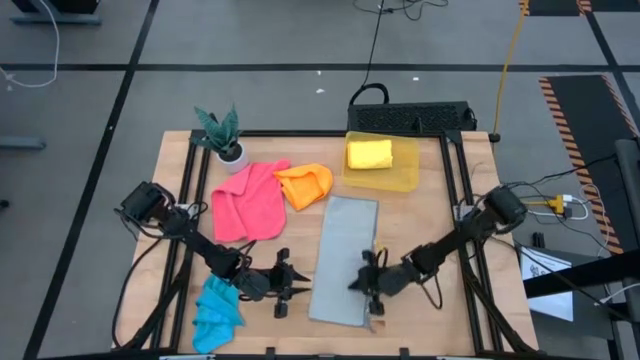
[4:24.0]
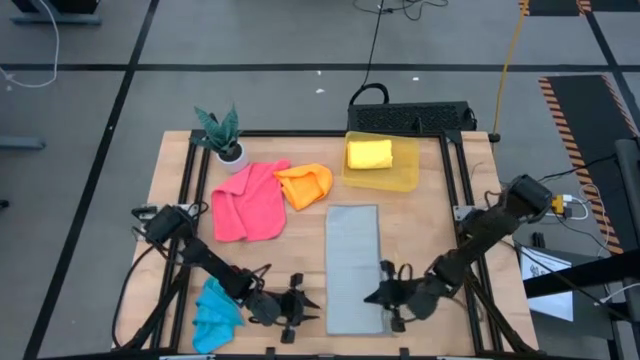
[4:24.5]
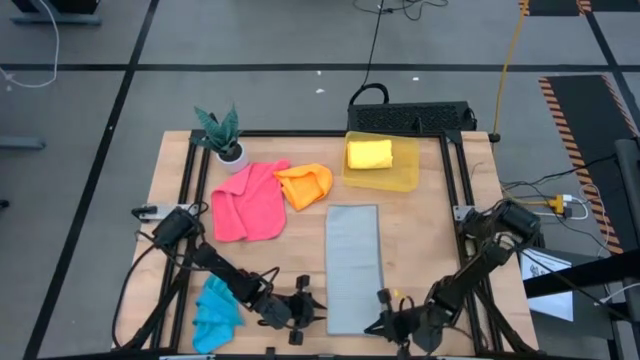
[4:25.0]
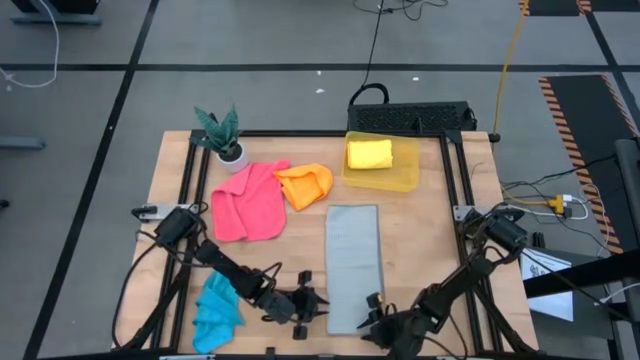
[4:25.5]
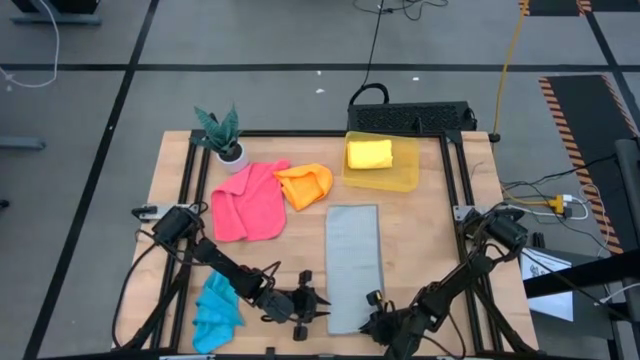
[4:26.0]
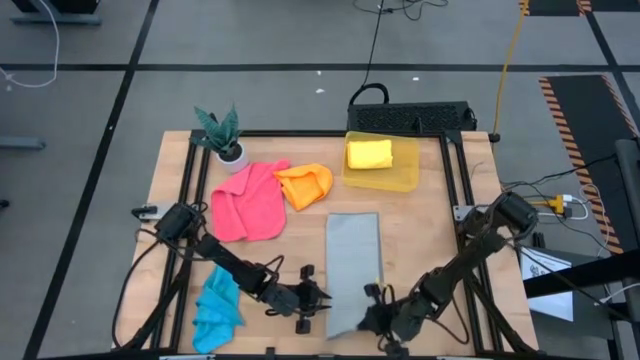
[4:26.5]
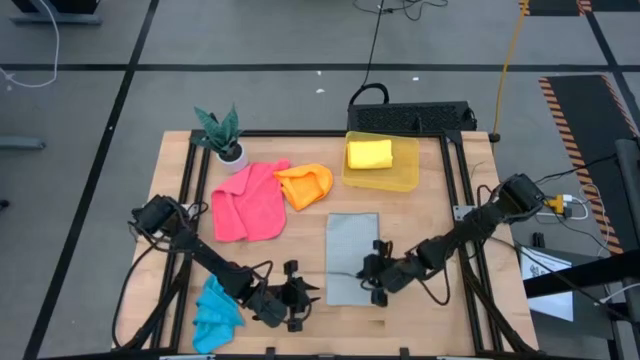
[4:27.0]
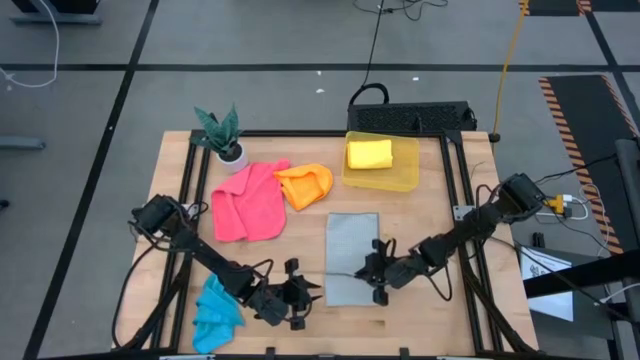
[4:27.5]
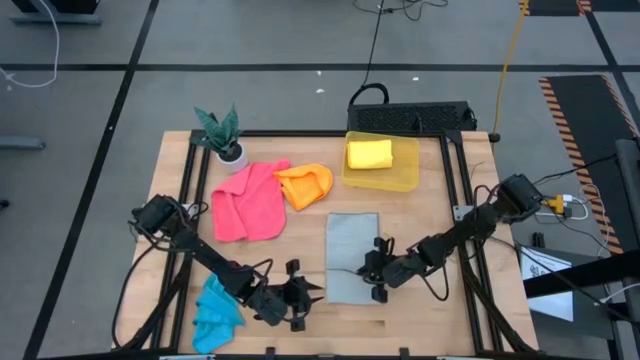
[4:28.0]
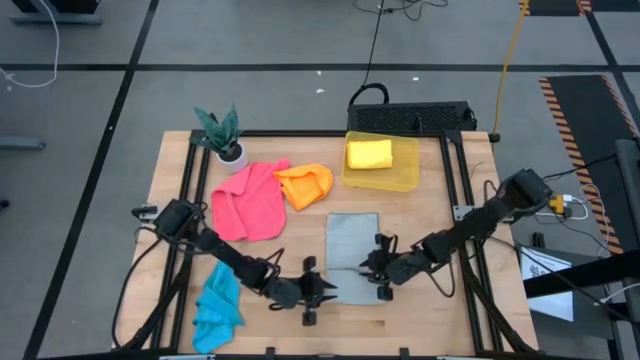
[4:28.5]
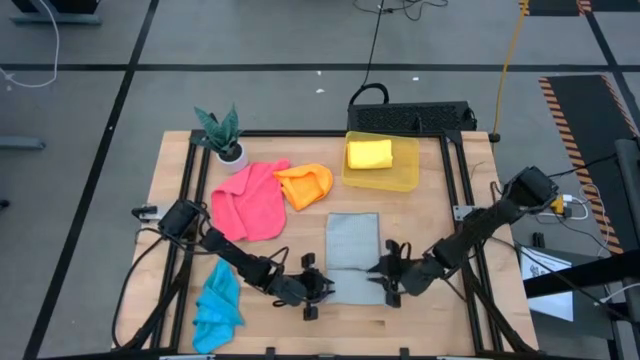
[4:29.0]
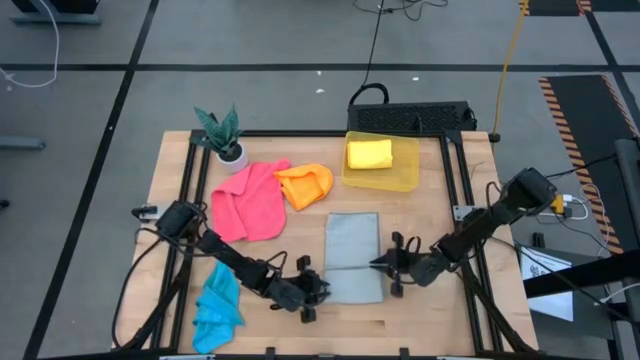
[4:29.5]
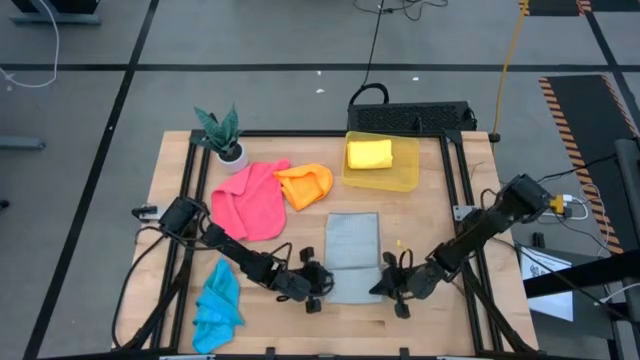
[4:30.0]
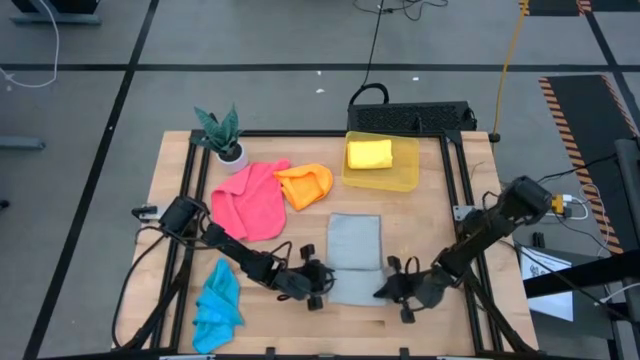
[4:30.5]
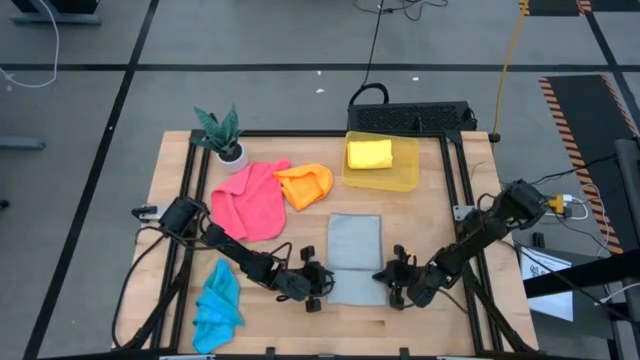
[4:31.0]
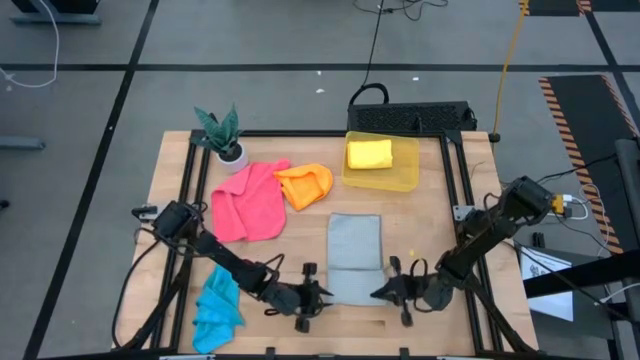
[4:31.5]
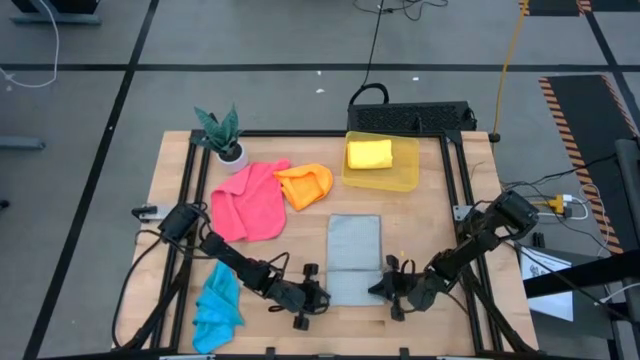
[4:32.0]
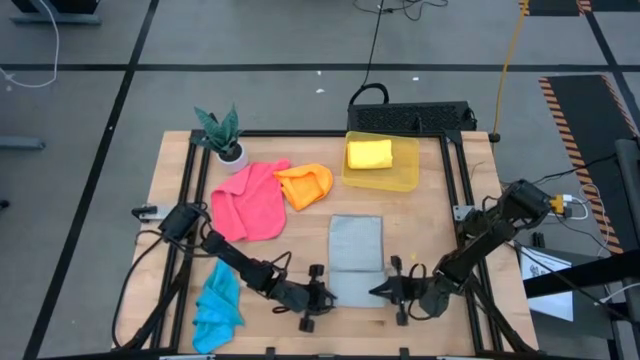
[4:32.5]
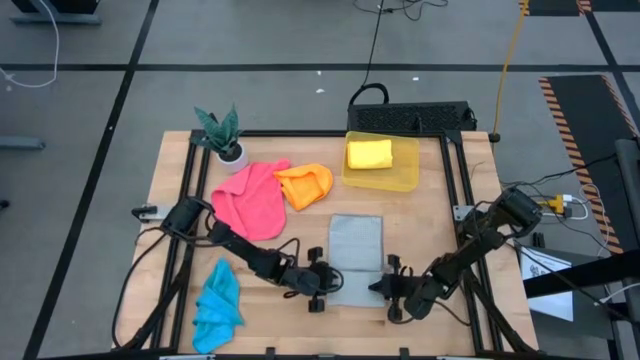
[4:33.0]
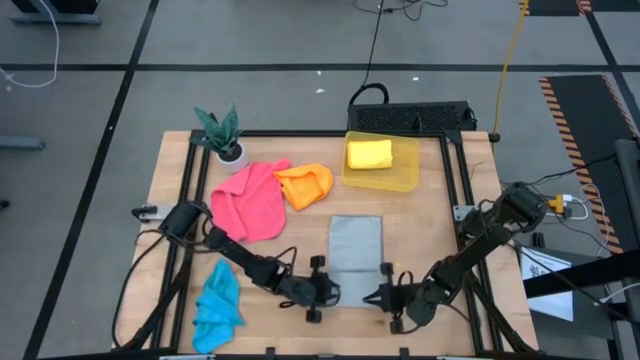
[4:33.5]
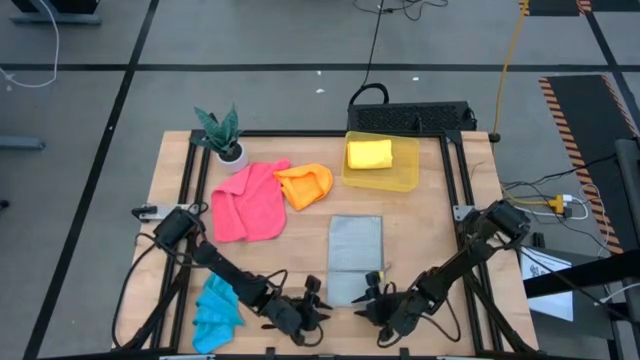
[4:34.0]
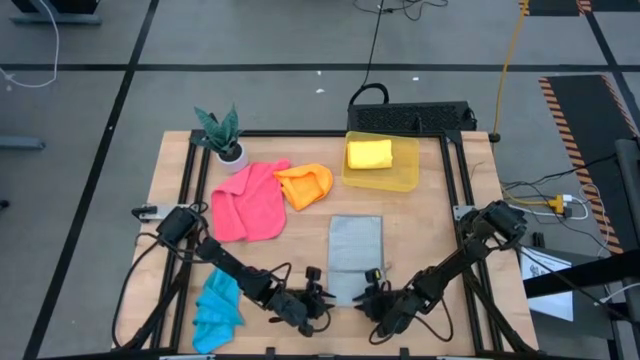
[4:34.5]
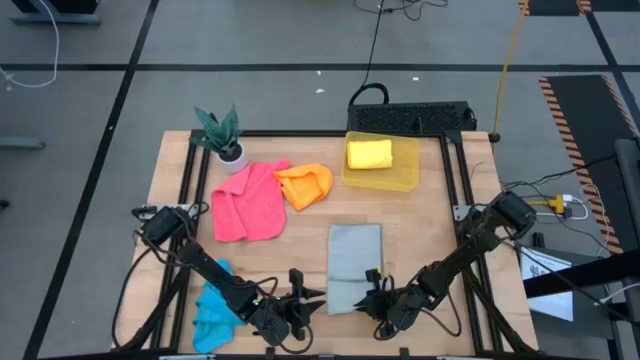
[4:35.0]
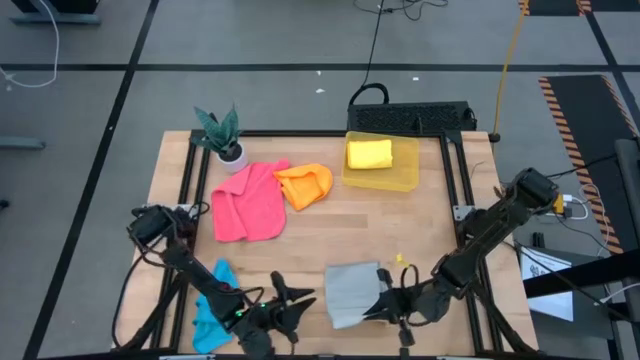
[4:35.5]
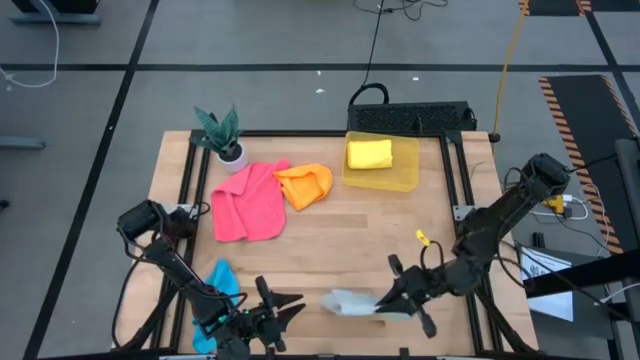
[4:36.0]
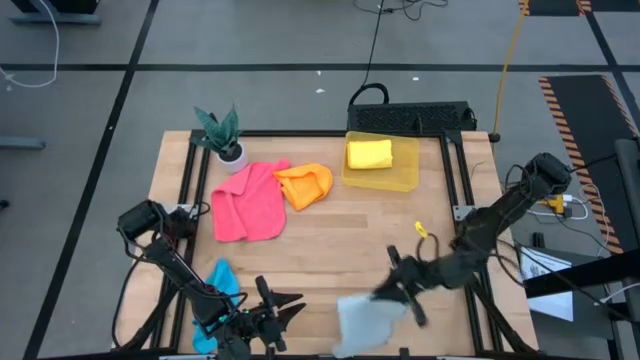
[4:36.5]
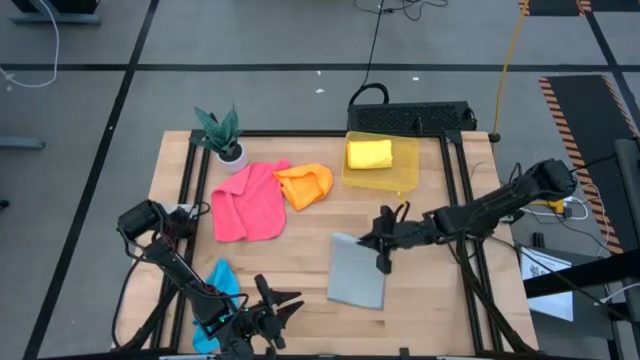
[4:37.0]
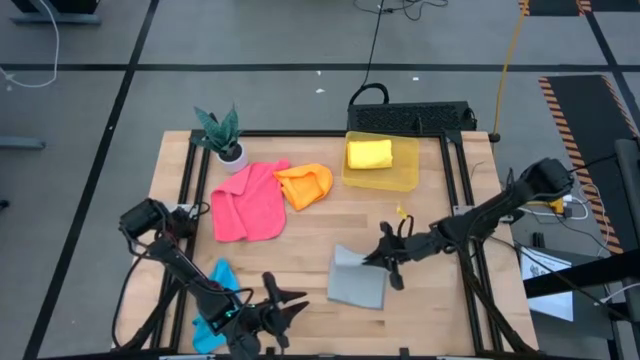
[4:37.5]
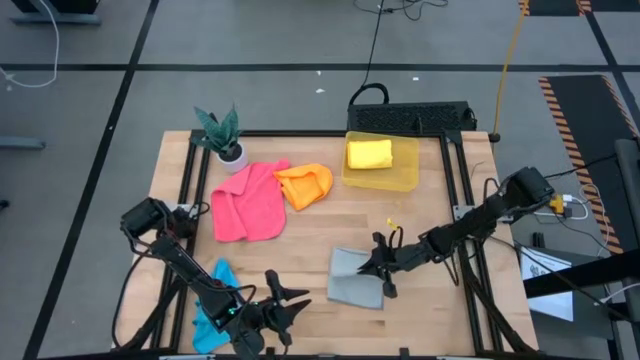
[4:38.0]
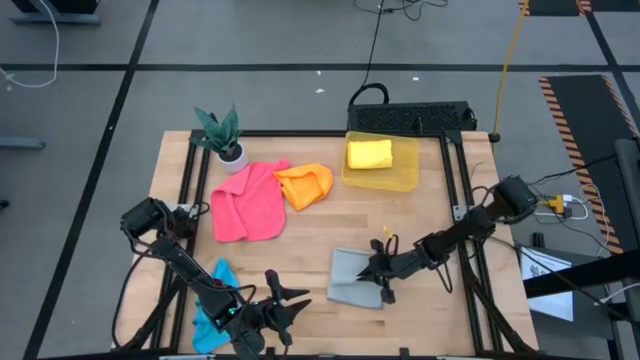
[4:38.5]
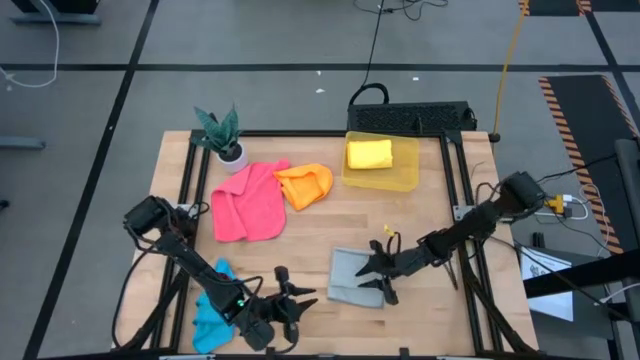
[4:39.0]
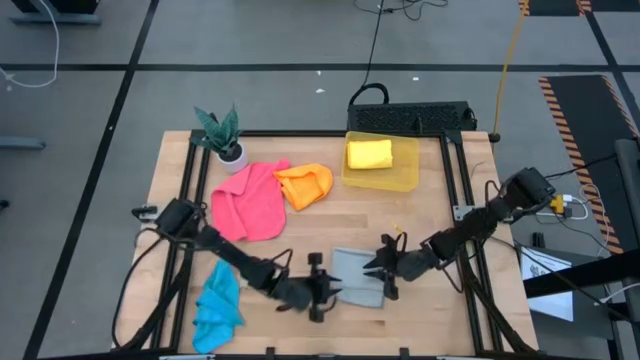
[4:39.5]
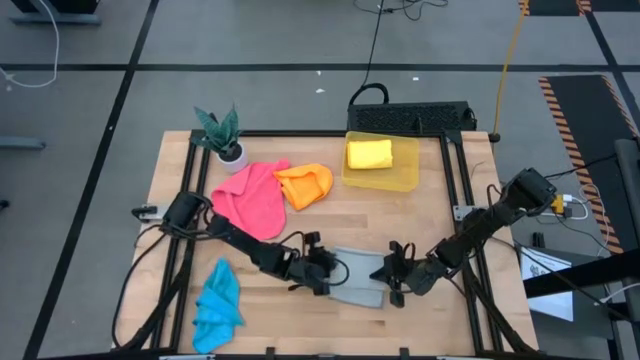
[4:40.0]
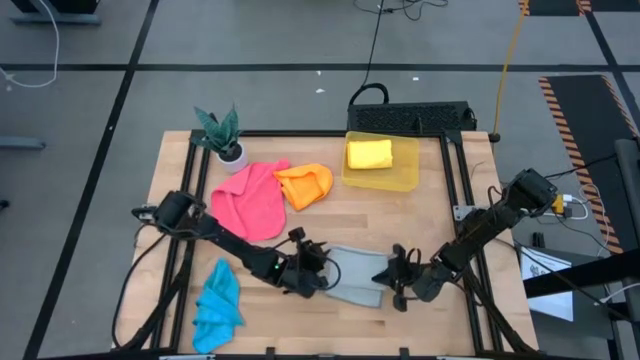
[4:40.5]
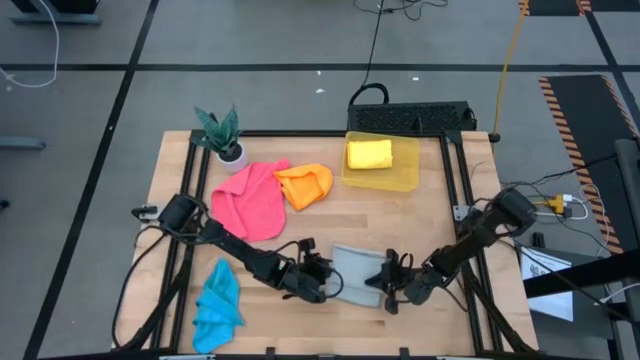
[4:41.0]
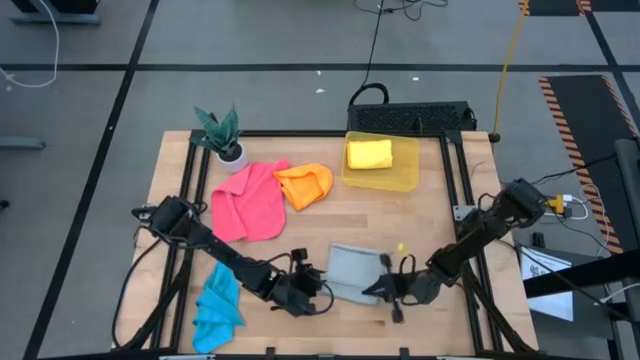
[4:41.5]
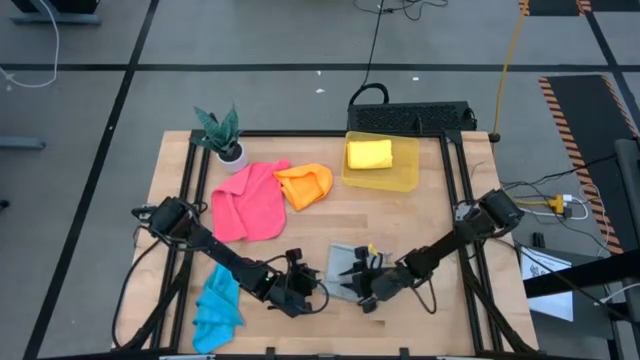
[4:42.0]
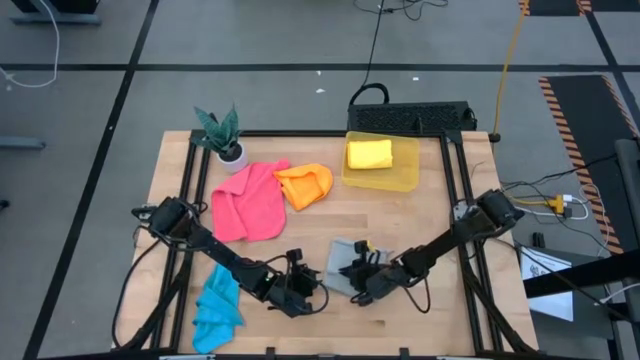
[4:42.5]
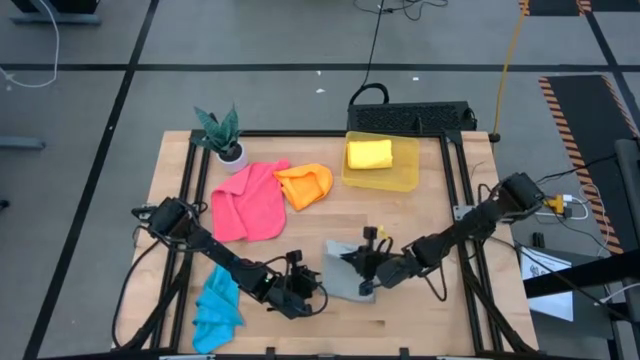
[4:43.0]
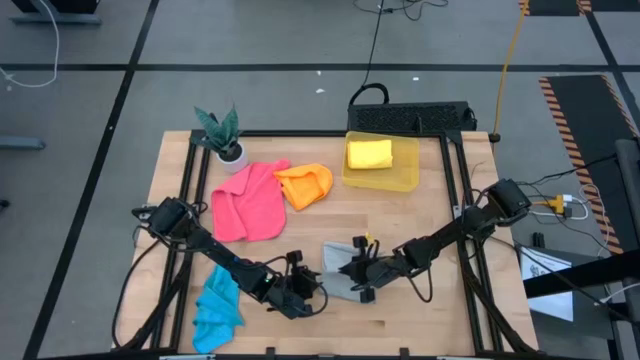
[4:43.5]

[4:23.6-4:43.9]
Task: Fold microfiber towels
Fold the gray kitchen towel
